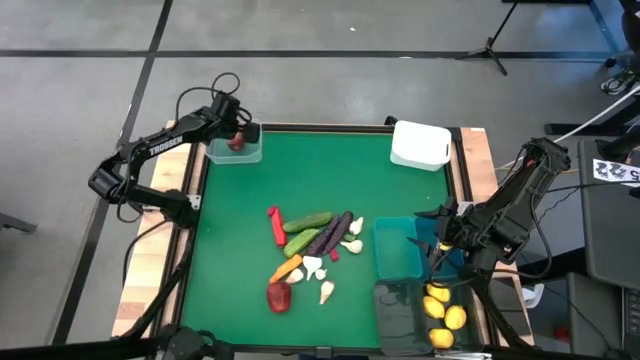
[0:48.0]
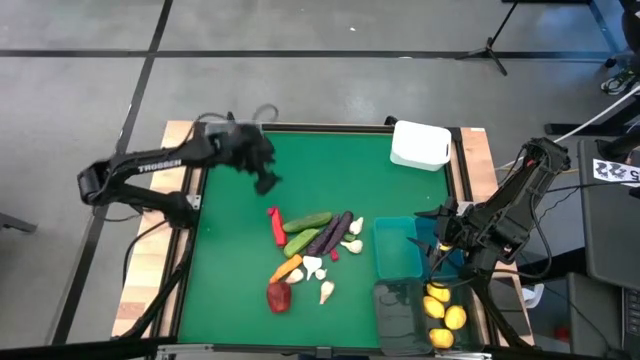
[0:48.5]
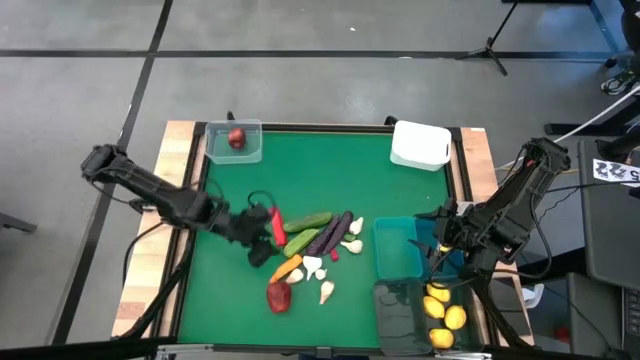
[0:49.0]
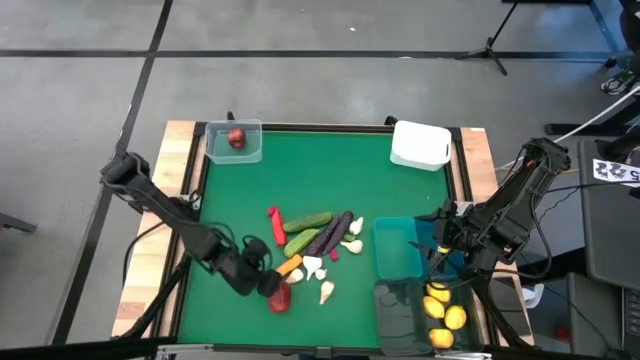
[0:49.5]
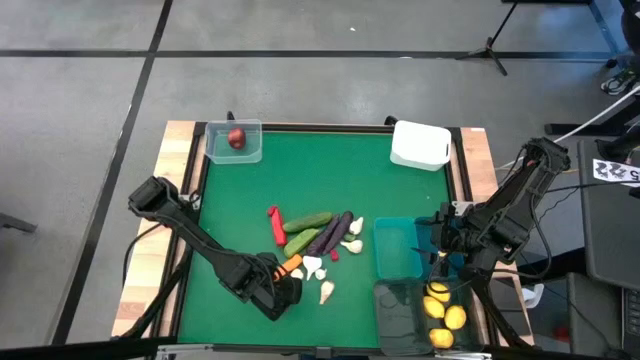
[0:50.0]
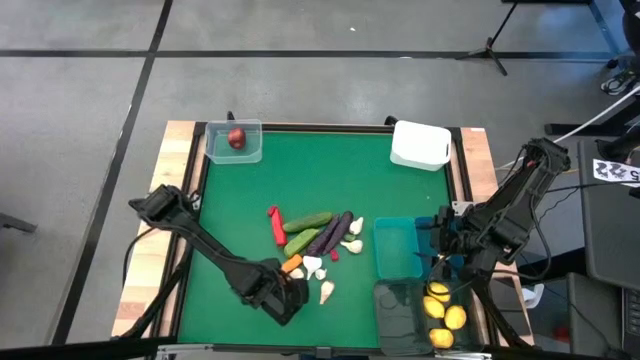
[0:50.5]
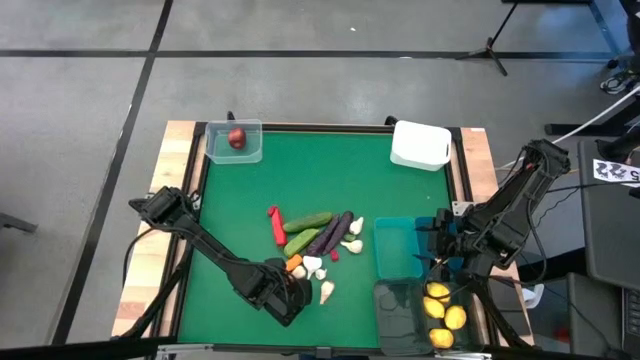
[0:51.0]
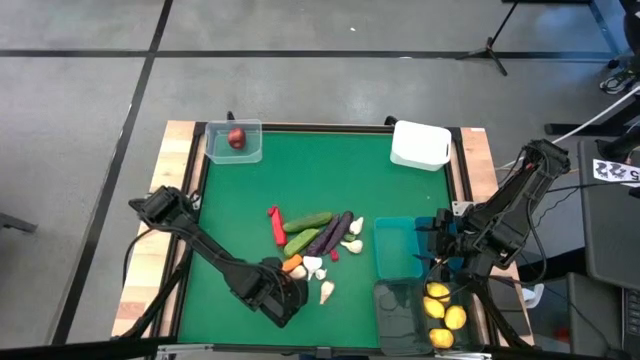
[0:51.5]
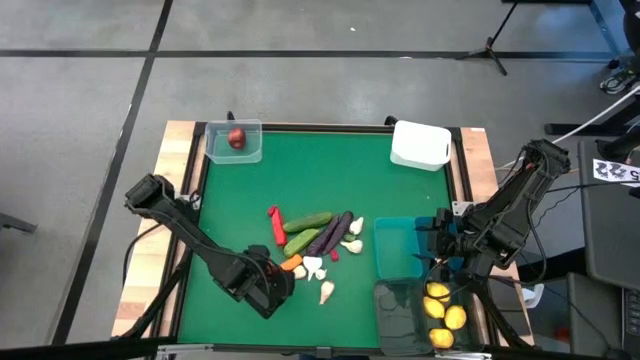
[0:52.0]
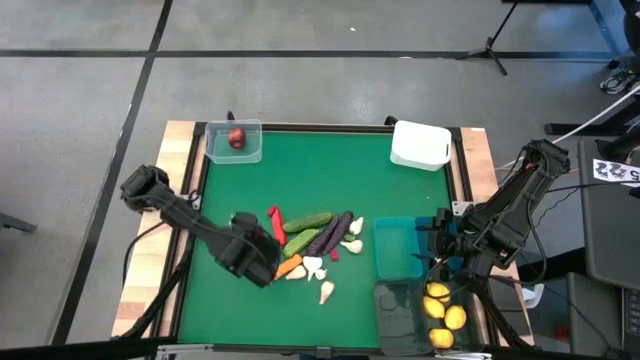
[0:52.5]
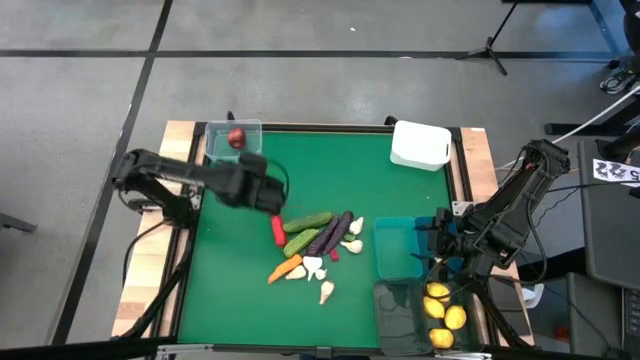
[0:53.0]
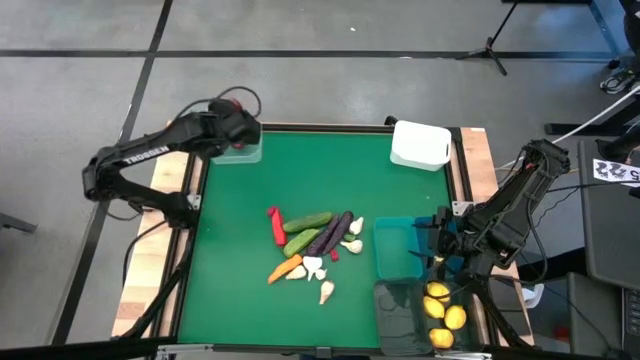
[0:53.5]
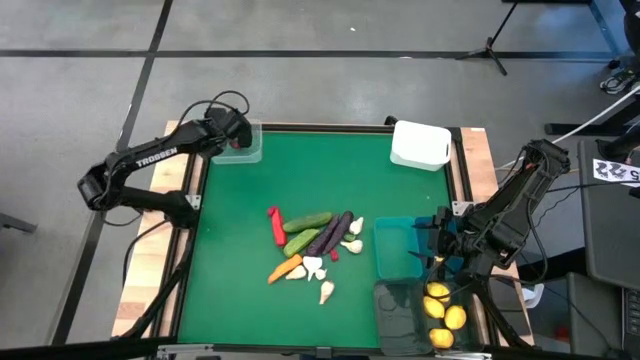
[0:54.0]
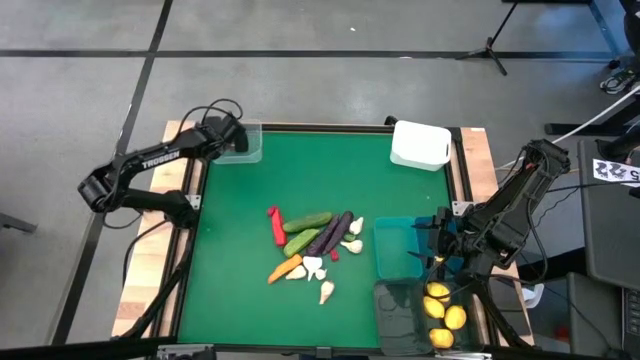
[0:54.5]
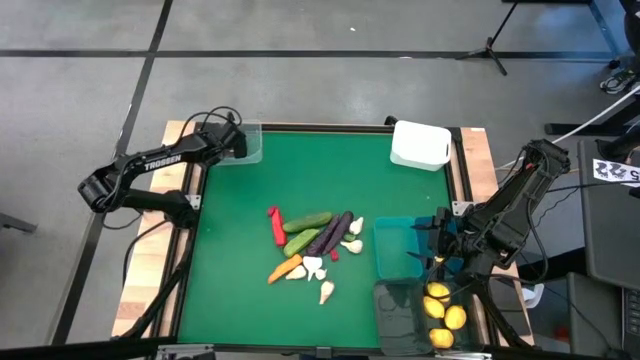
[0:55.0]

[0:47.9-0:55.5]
Task: Sort produce into baskets
Put the apple into the transparent bin

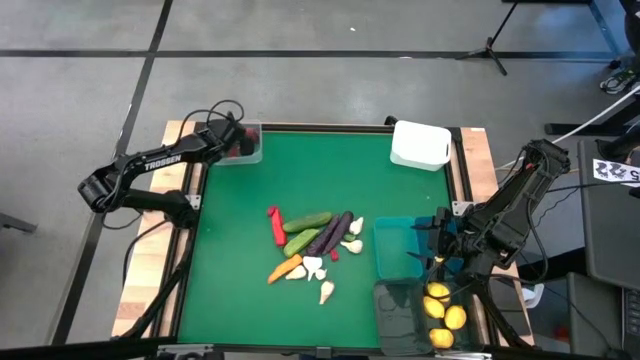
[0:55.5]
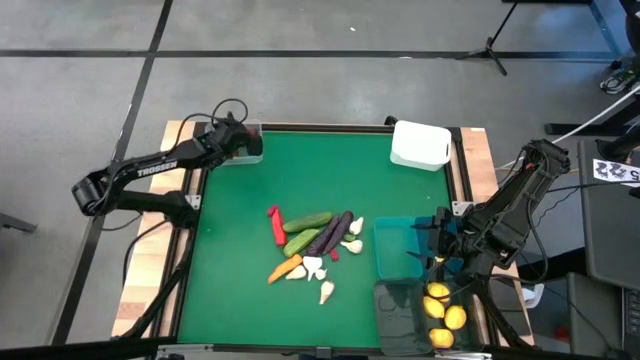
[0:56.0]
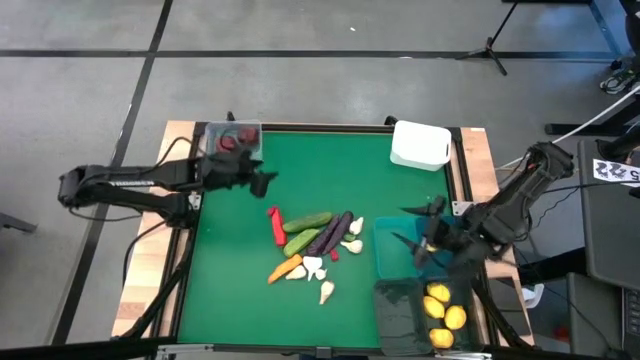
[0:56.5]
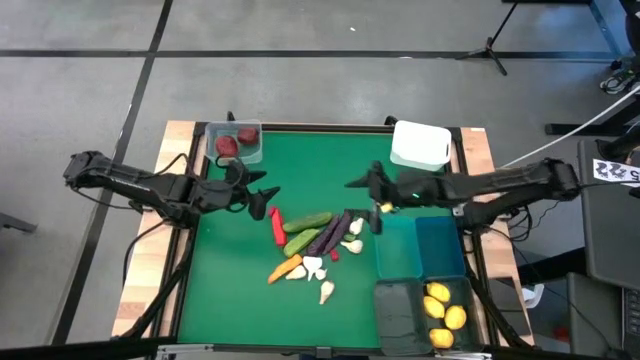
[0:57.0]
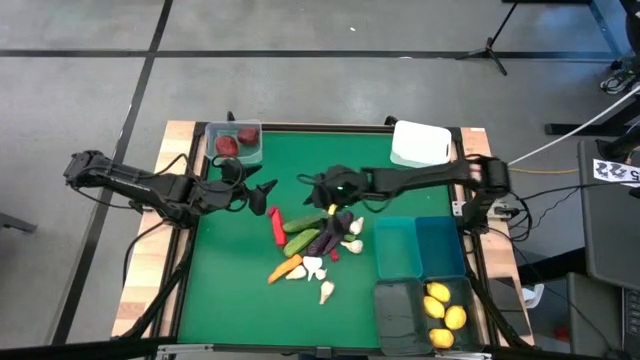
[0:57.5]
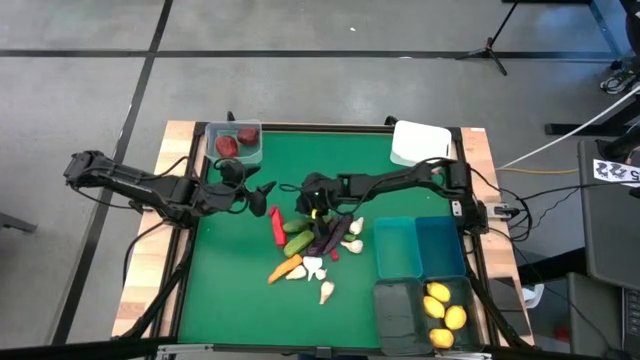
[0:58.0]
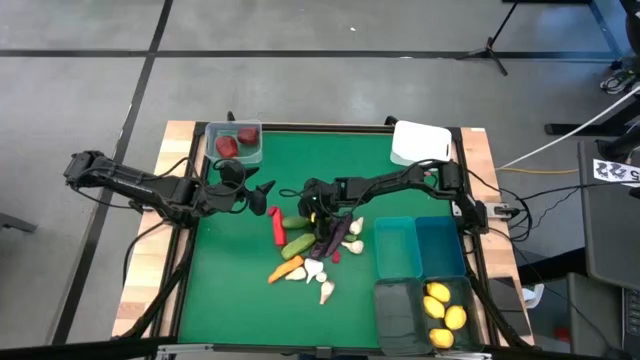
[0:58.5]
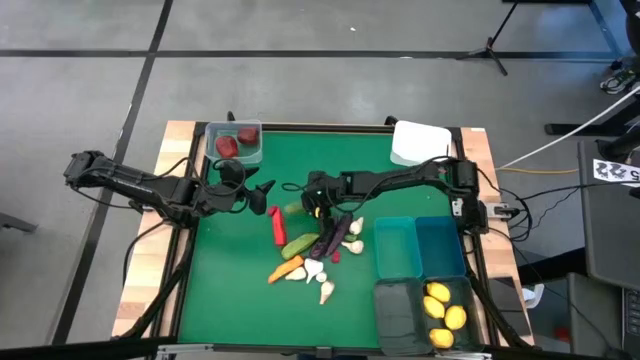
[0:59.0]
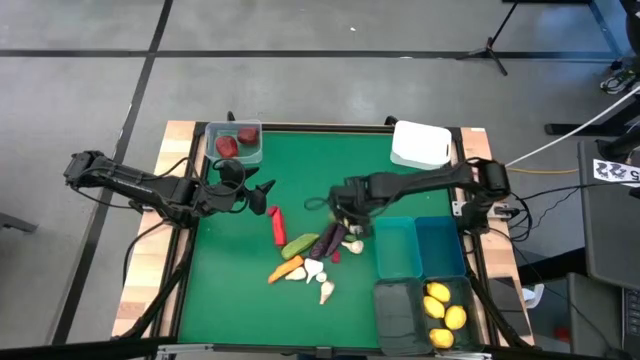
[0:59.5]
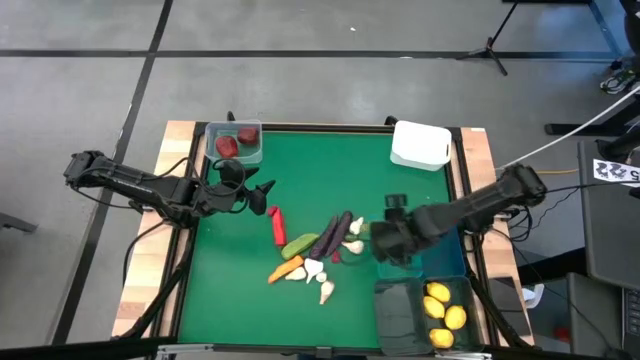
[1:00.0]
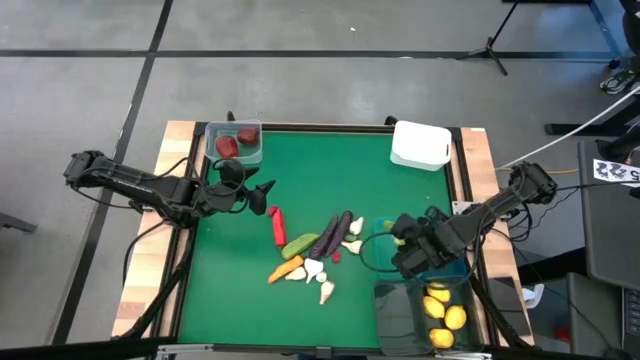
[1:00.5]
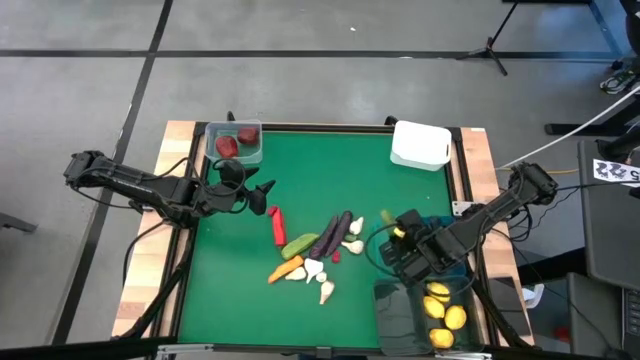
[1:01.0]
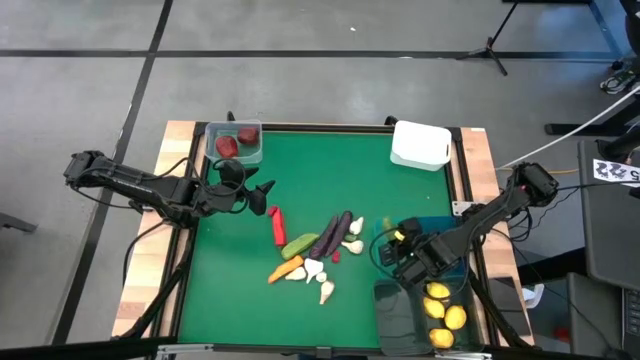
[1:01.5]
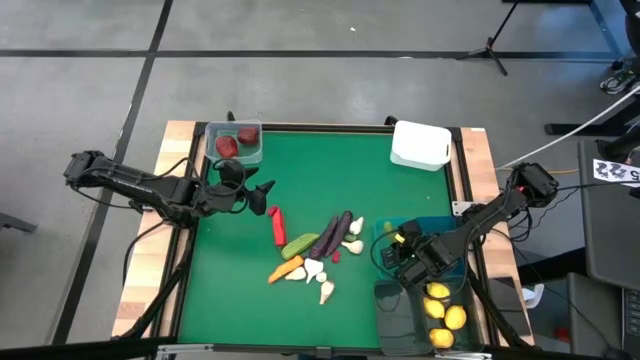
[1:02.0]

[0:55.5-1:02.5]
Put the cucumber into the green bin

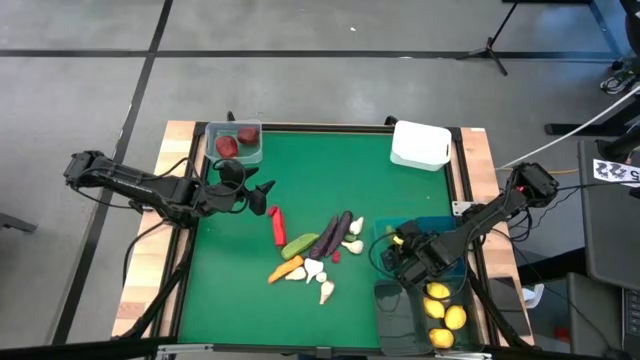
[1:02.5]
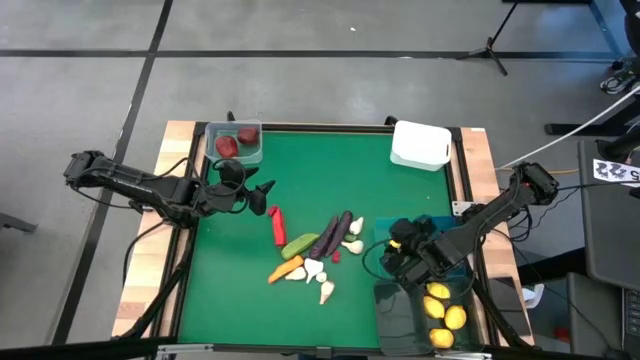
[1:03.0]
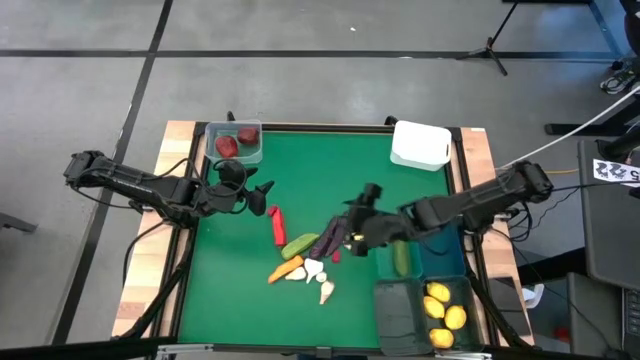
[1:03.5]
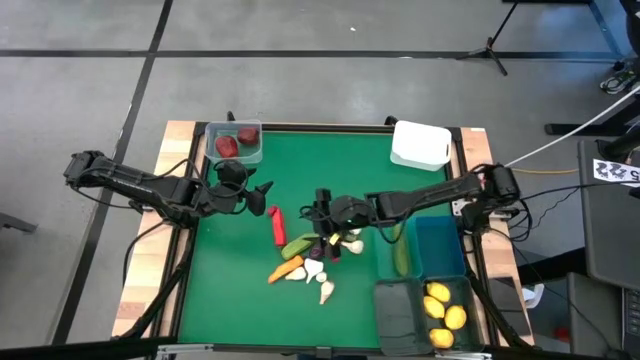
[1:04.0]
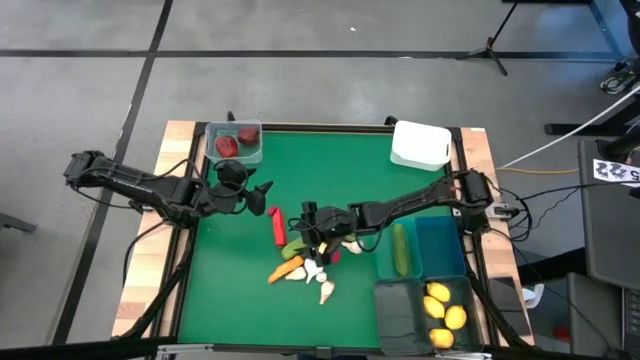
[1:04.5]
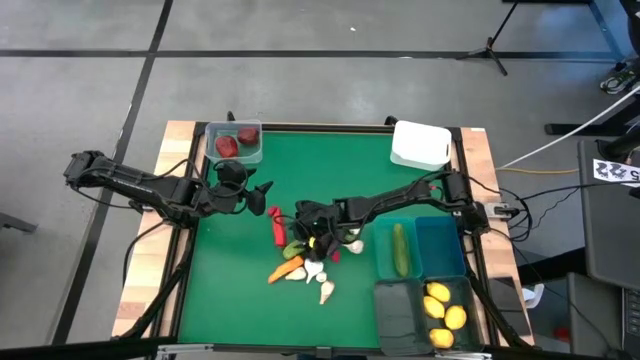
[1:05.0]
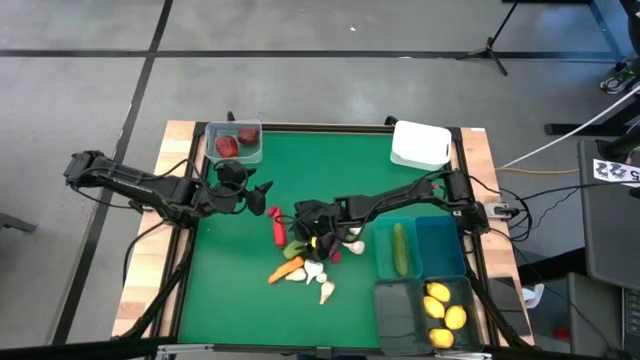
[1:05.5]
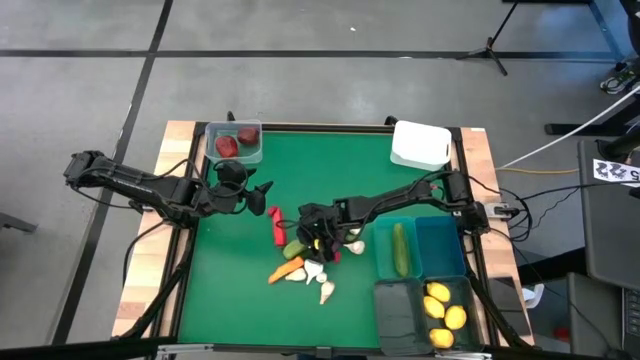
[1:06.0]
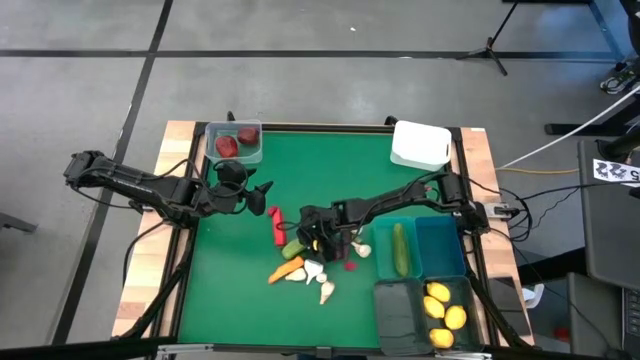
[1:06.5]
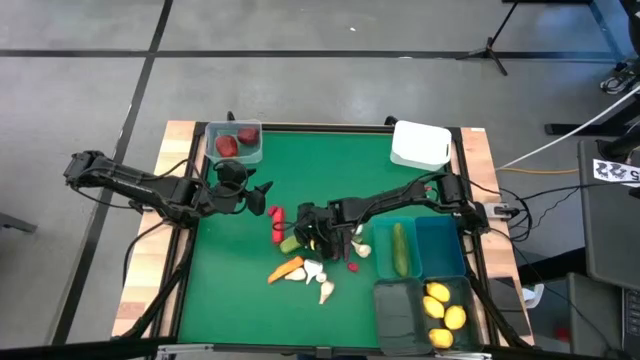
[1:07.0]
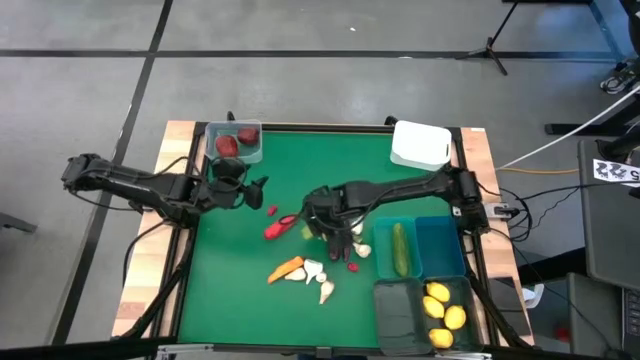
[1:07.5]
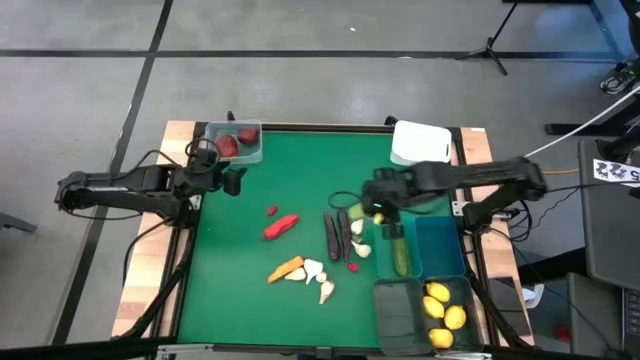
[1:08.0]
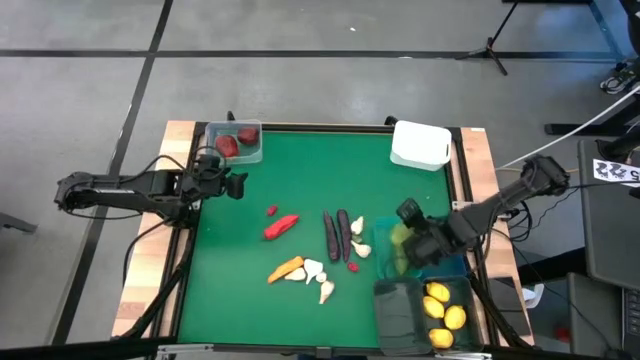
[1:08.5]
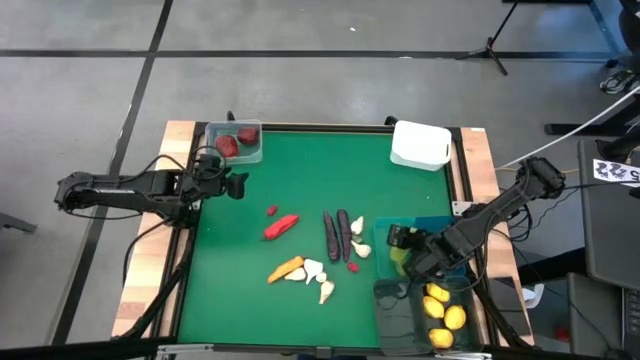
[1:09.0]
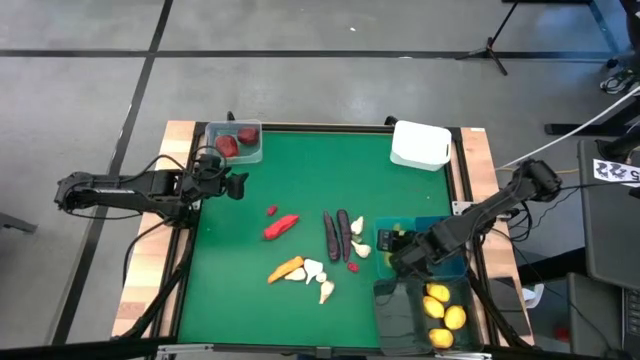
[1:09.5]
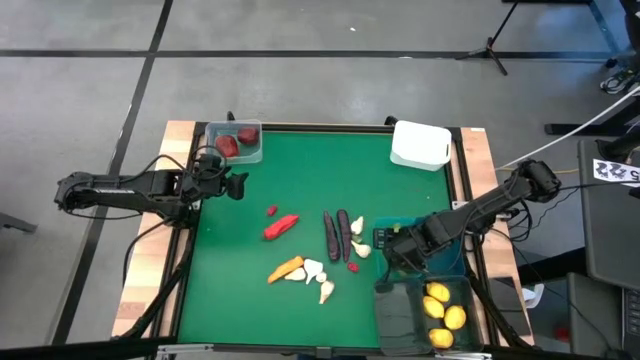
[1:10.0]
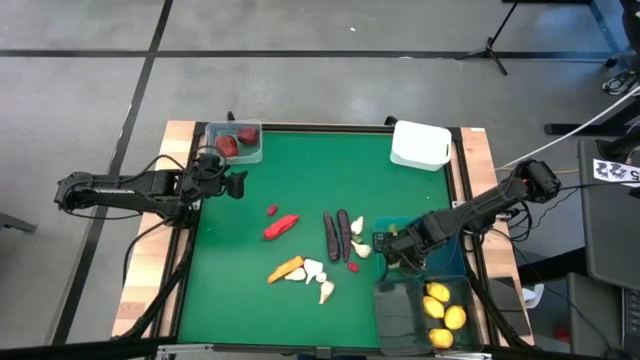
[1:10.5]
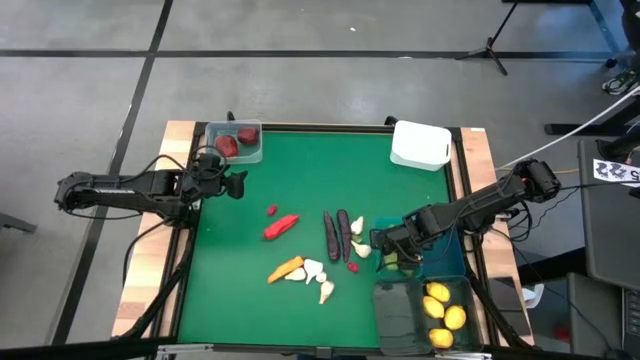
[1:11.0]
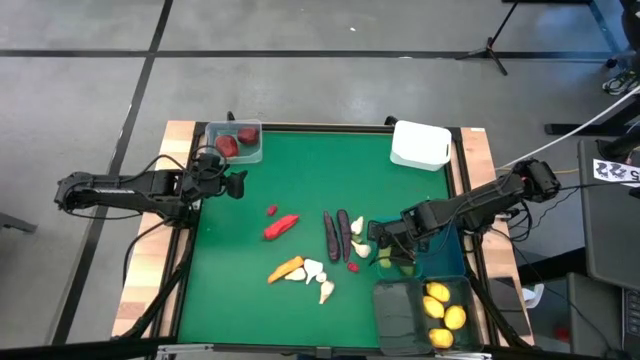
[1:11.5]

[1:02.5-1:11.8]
Put the cucumber into the green bin
